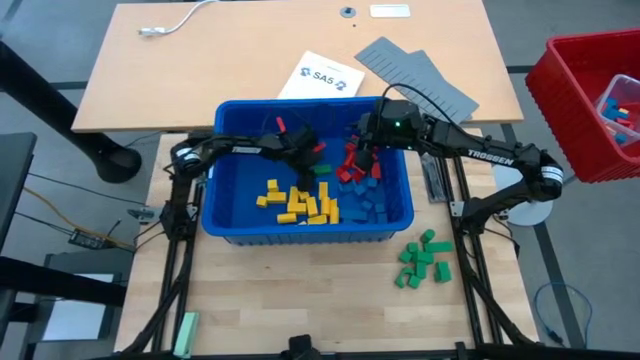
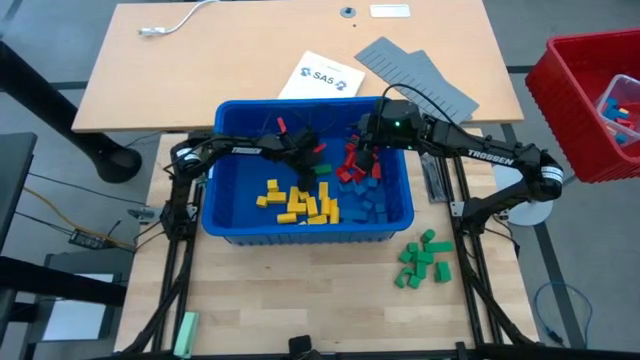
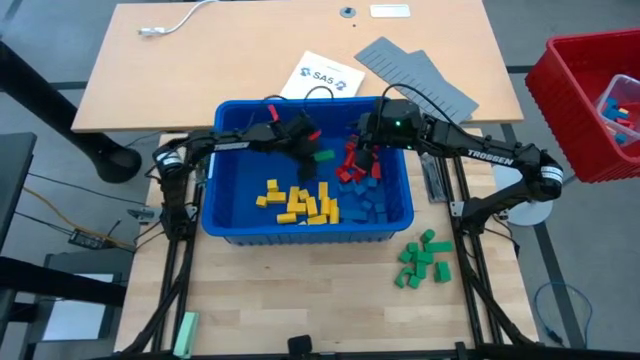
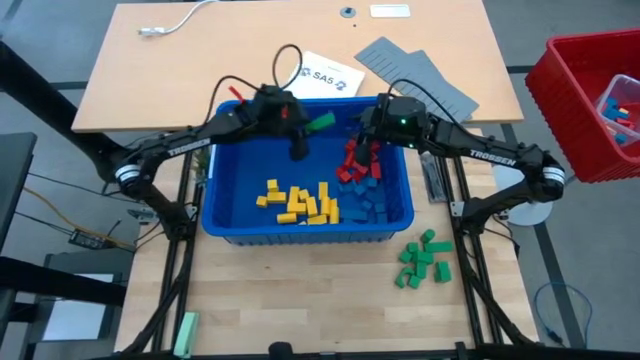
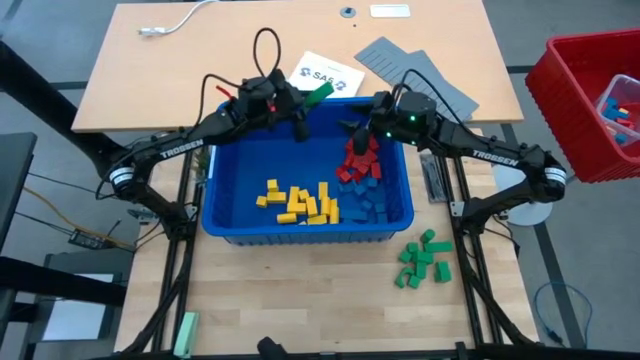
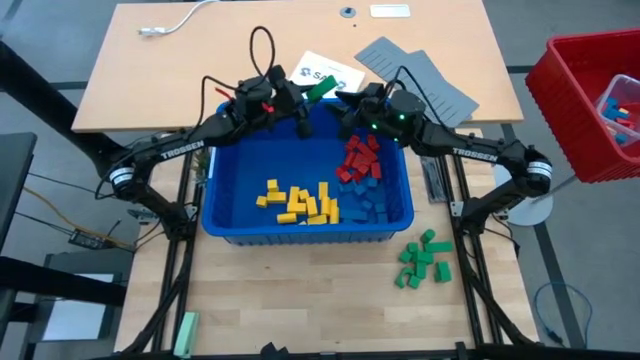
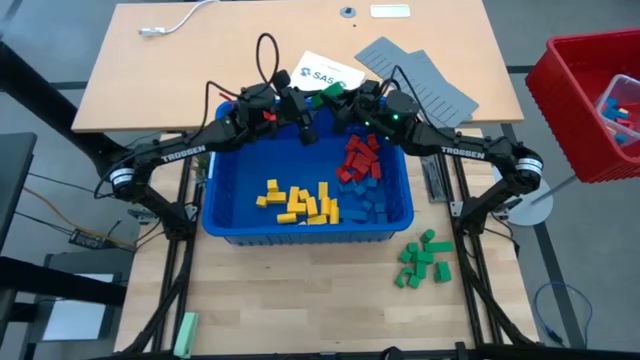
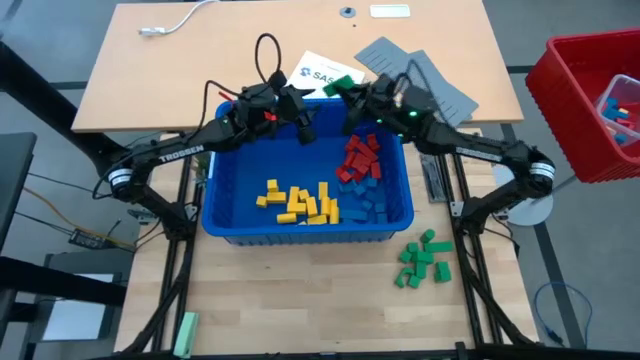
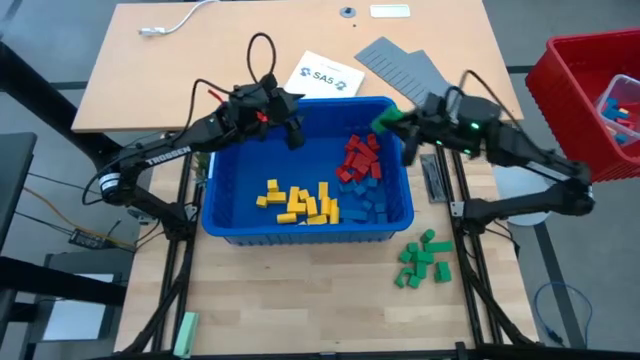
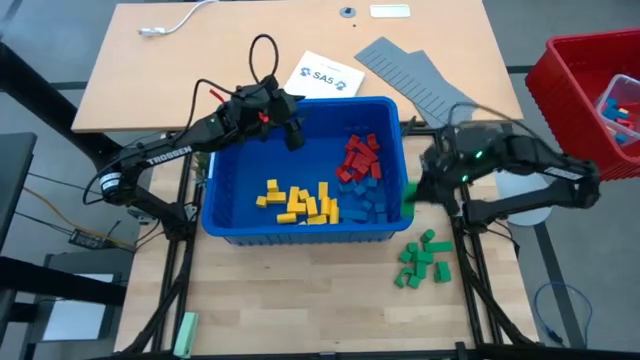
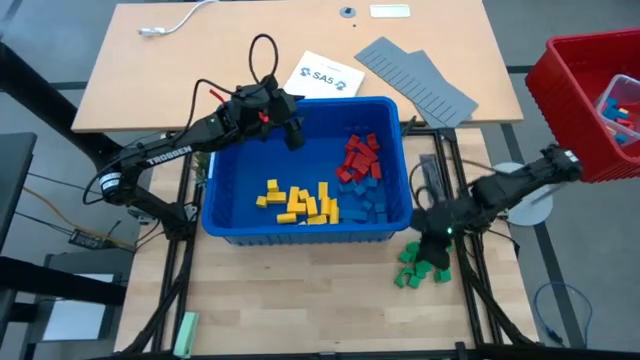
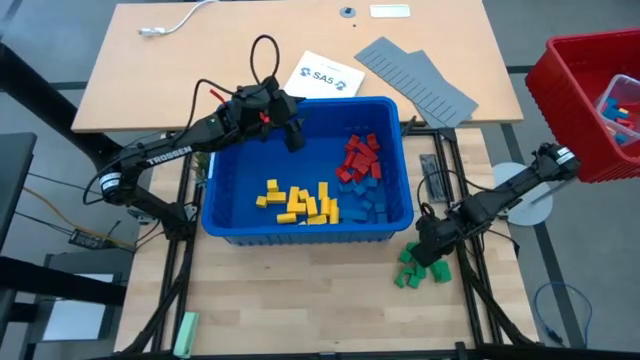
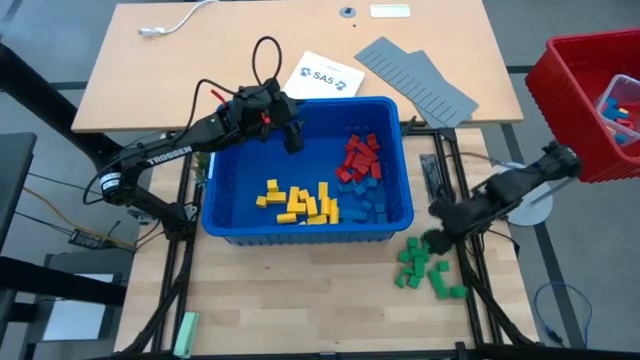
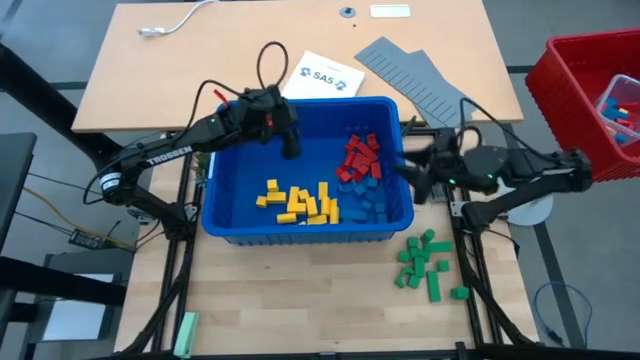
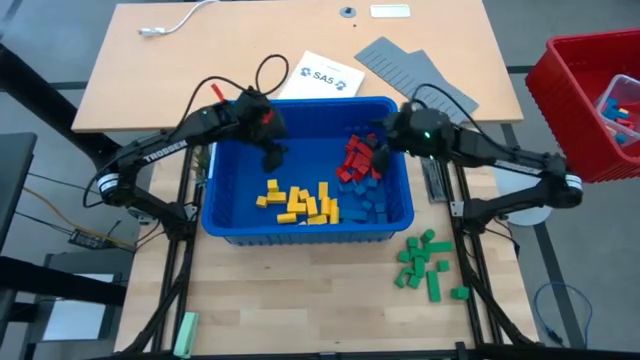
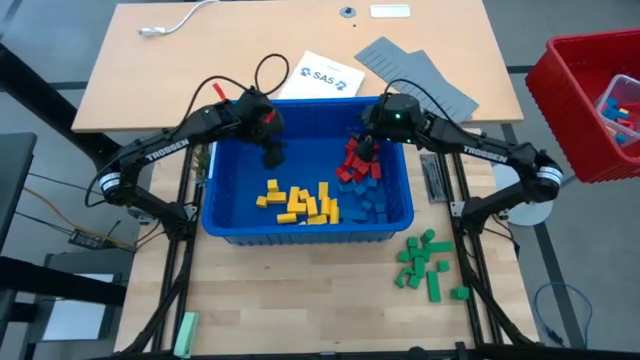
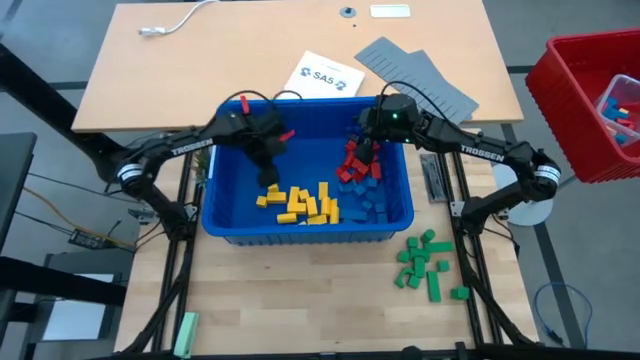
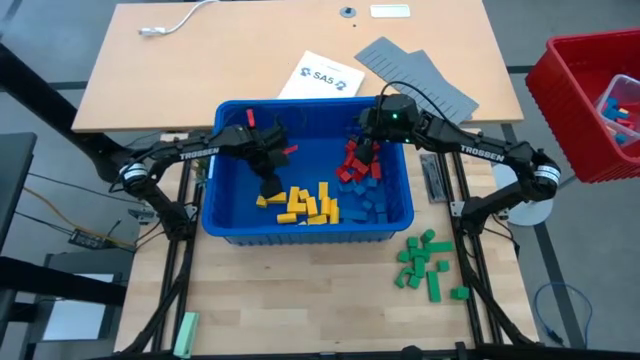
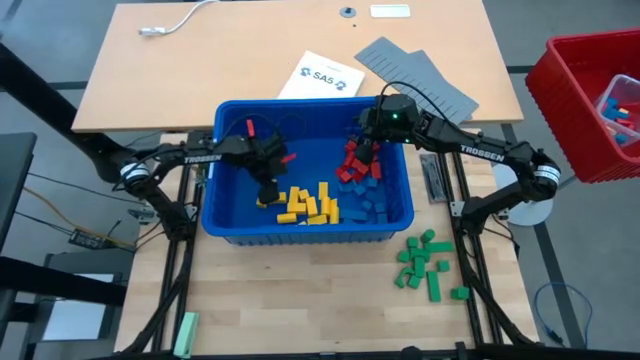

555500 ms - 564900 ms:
Task: Sort blocks
Remove the green block from the blue bin

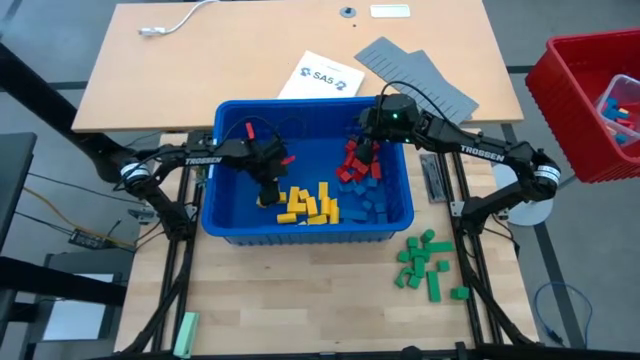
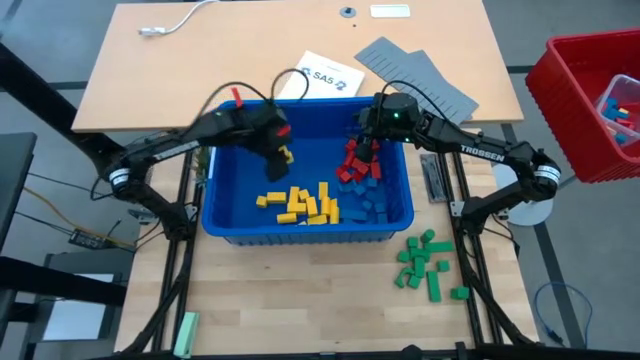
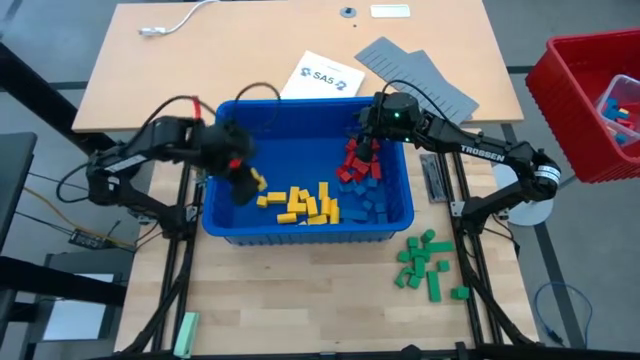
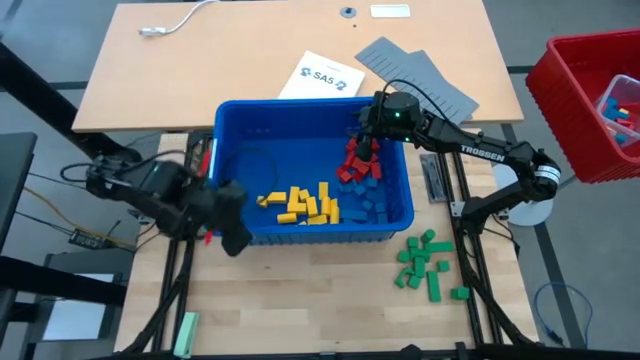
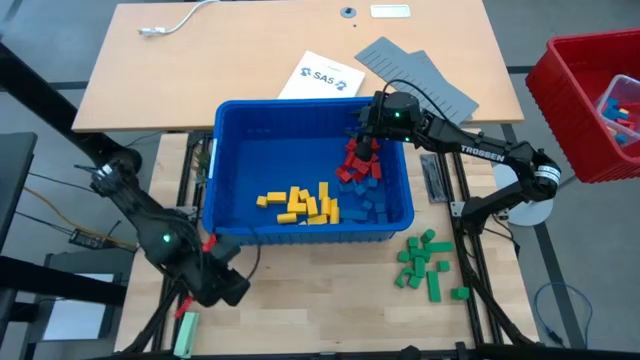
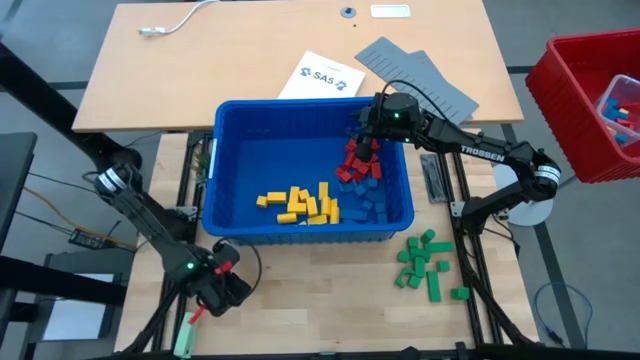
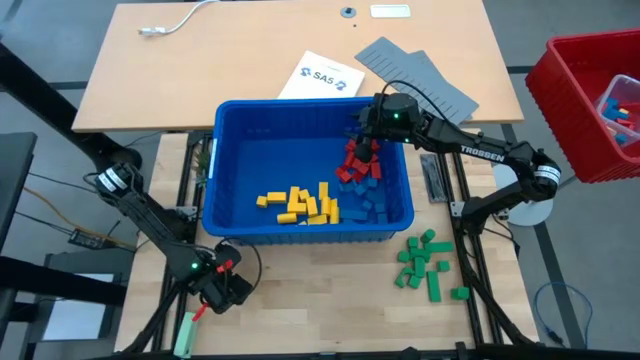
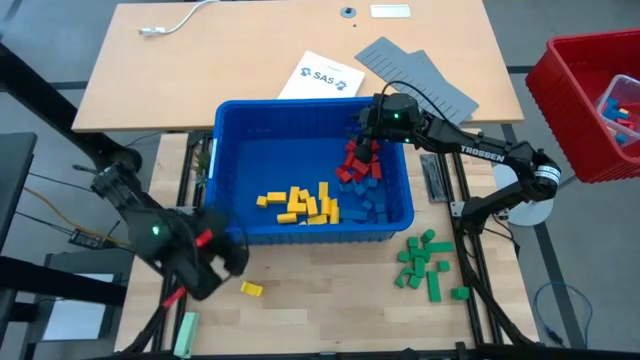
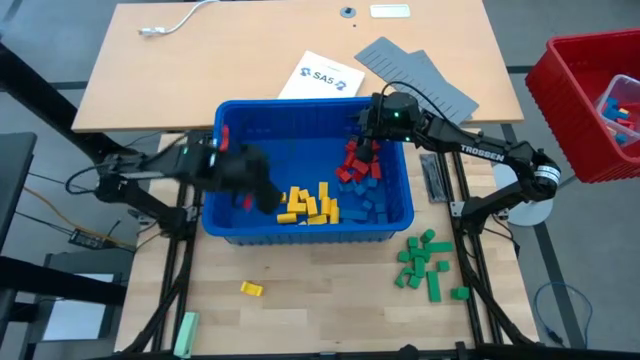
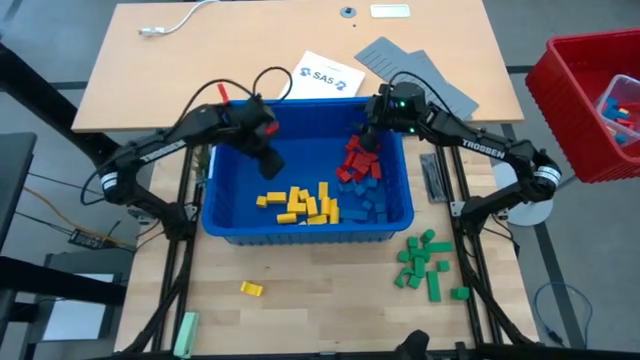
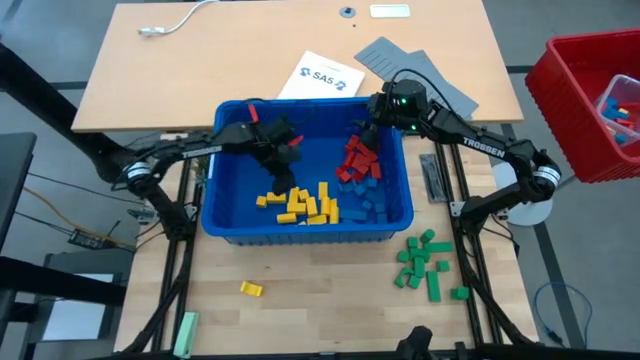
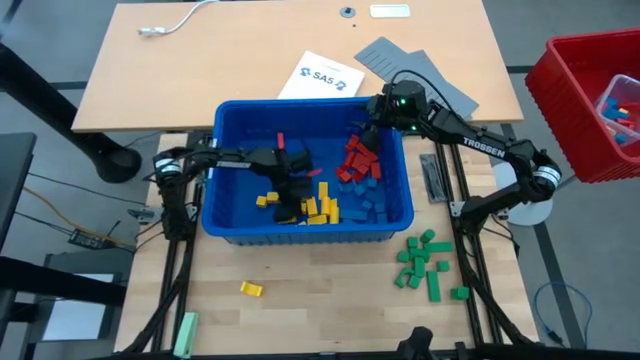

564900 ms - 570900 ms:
Remove the yellow block from the blue bin
